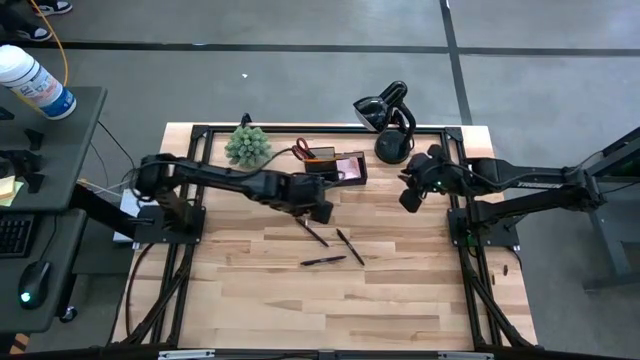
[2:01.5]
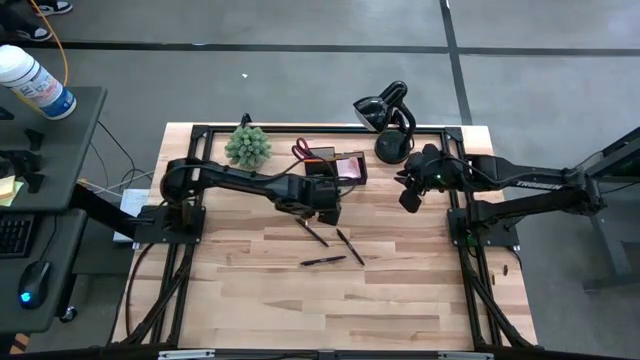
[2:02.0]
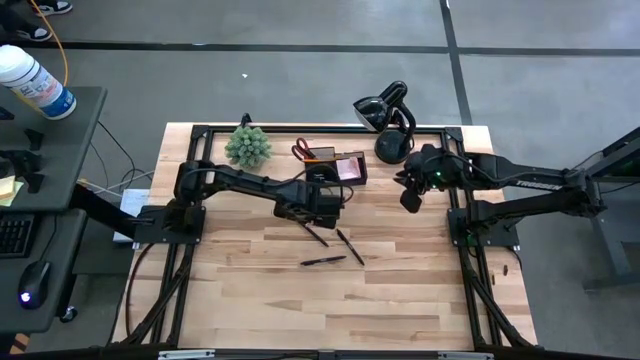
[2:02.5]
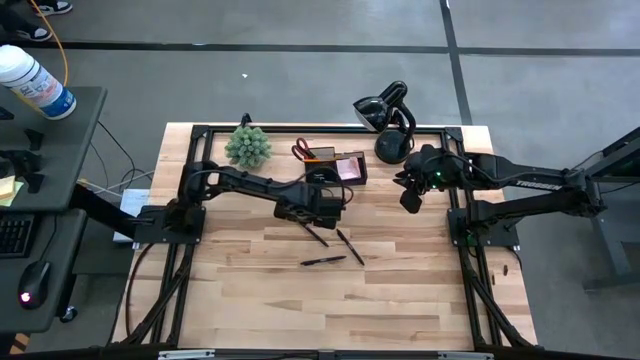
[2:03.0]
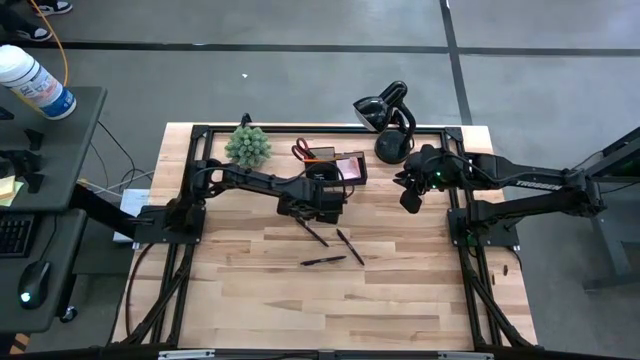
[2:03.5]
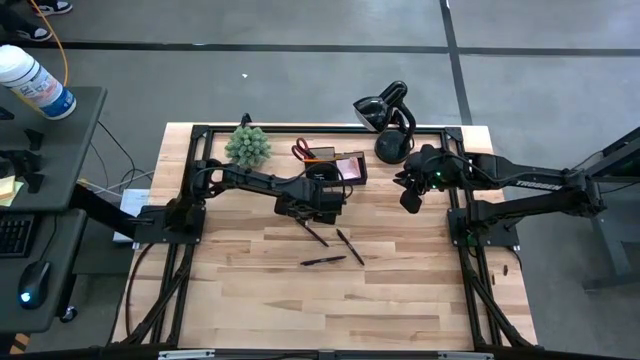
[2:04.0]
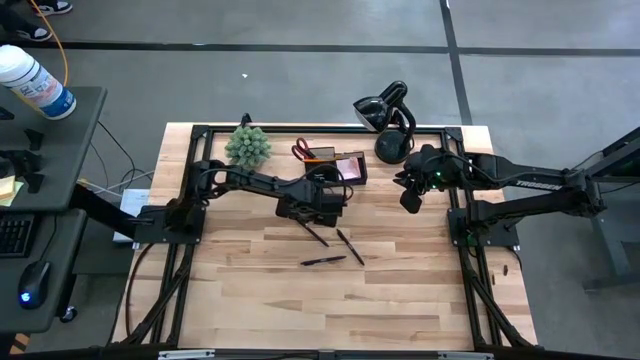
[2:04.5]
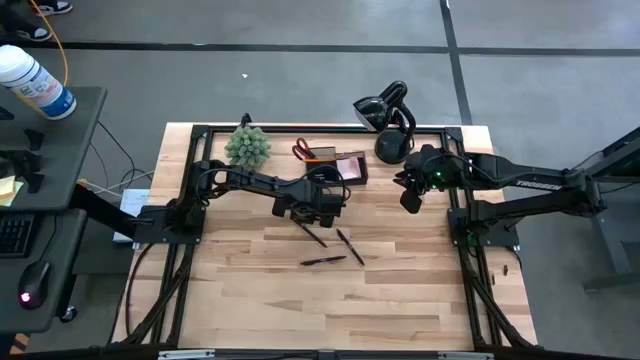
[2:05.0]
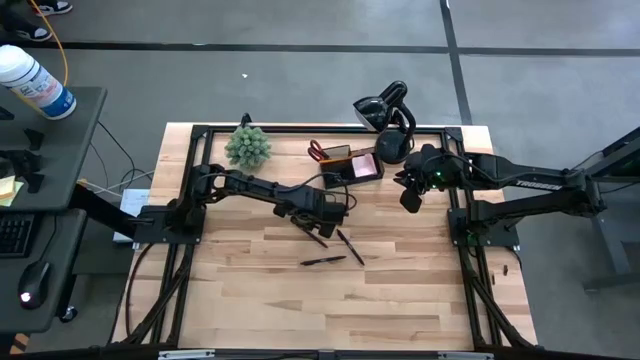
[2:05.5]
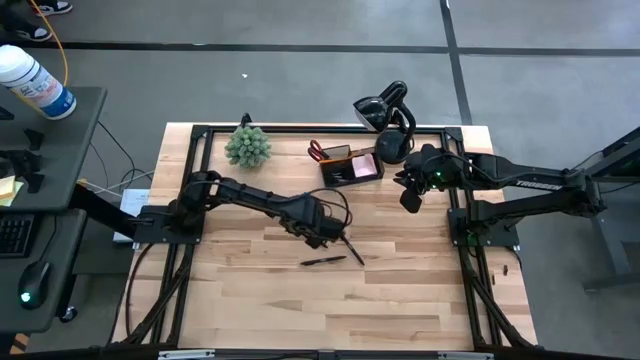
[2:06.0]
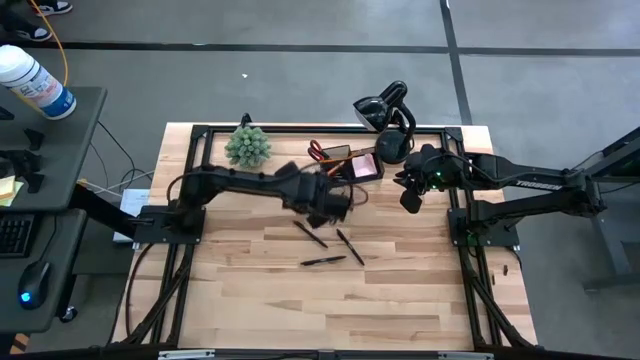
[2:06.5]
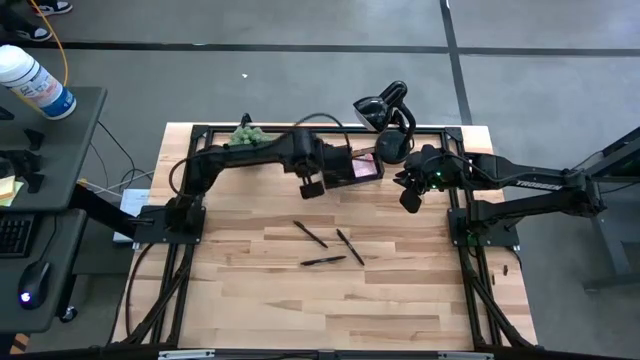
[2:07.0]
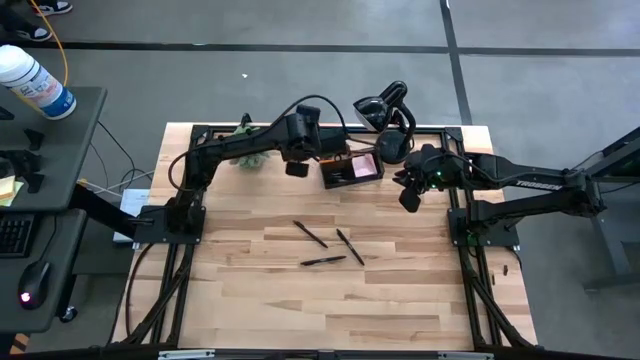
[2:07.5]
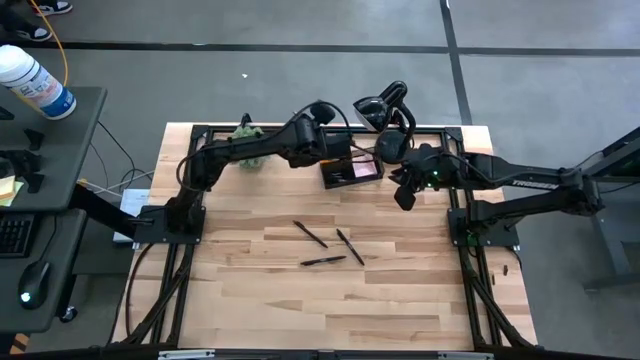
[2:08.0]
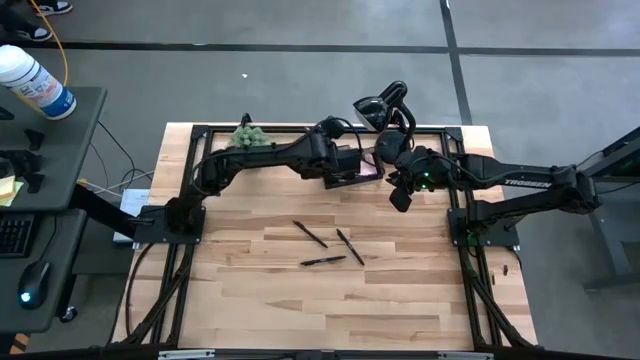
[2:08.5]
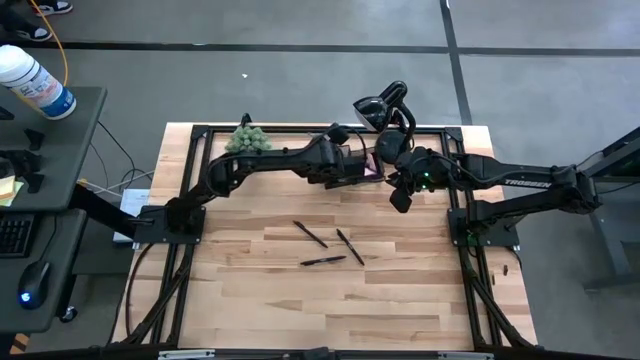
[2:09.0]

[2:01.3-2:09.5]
Task: Pick and place office supplies into organizer
Put the orange pencil into the black desk organizer

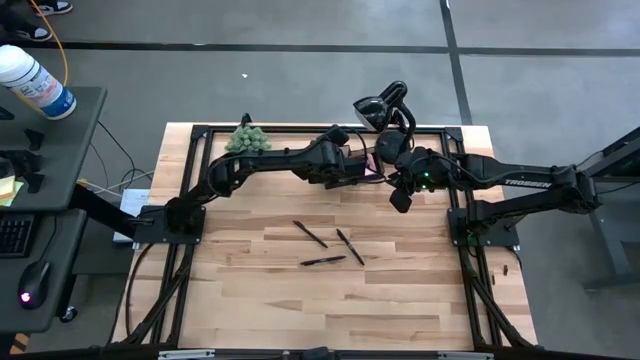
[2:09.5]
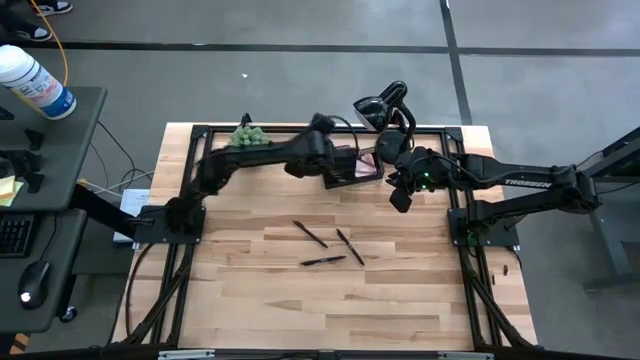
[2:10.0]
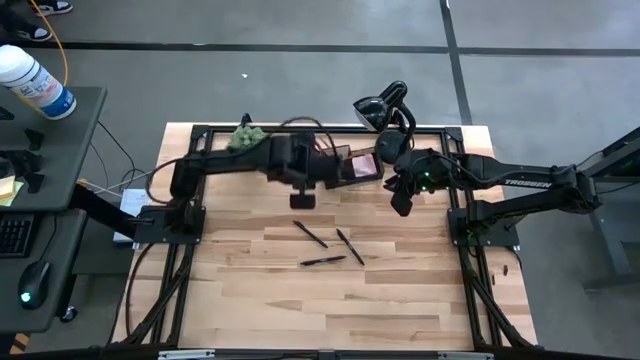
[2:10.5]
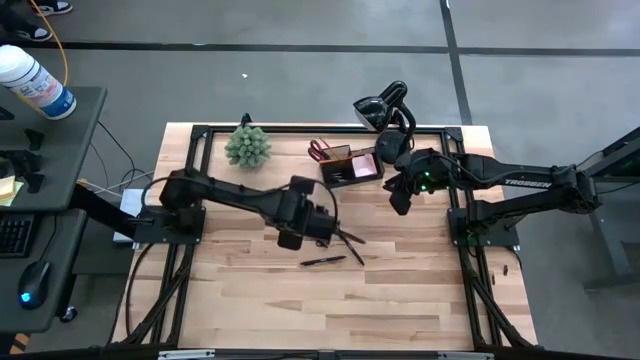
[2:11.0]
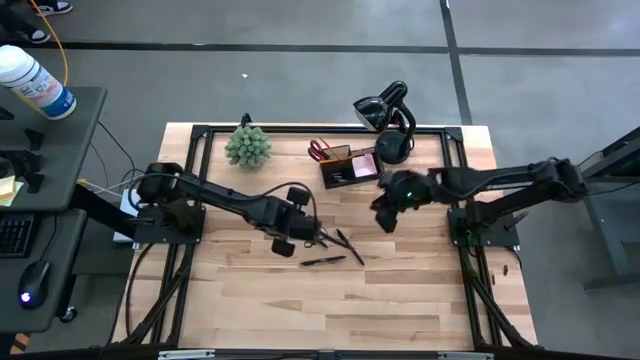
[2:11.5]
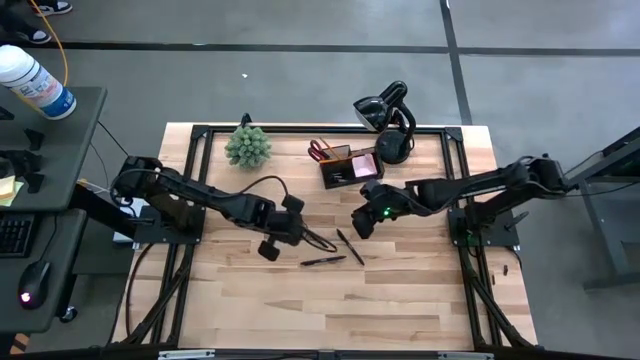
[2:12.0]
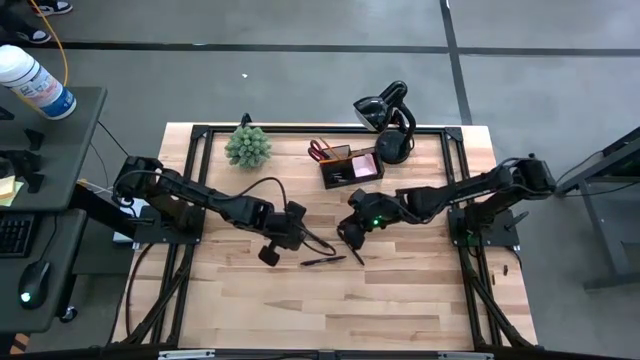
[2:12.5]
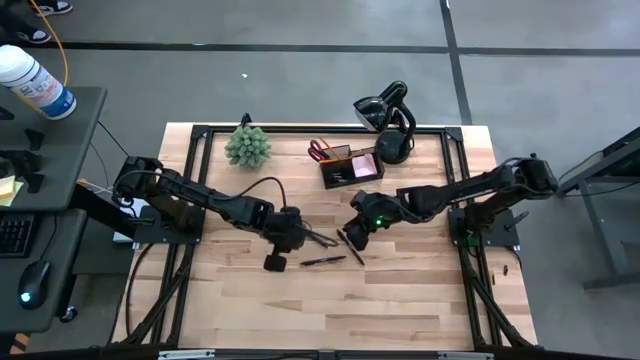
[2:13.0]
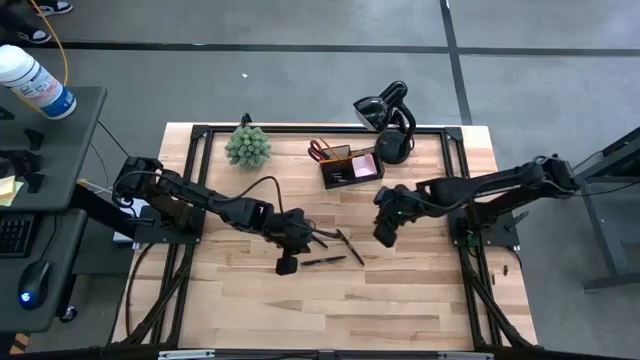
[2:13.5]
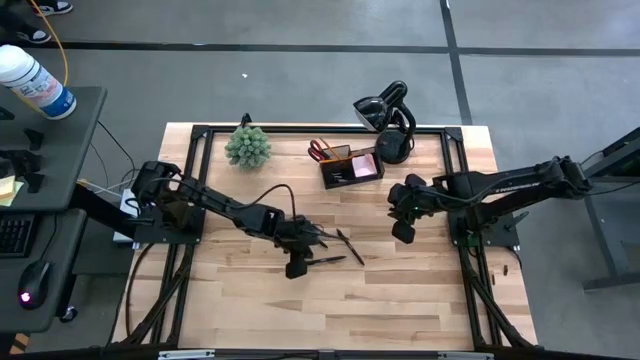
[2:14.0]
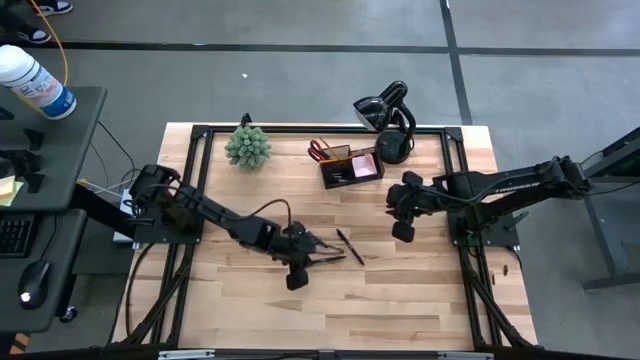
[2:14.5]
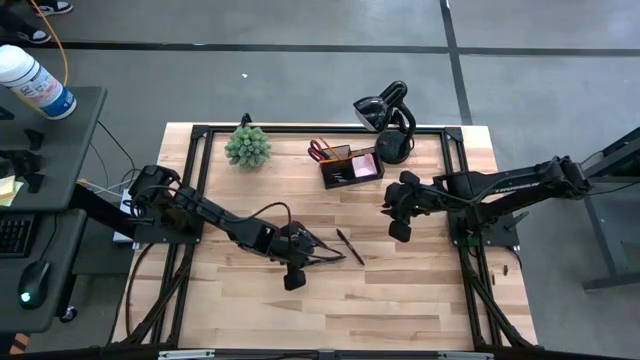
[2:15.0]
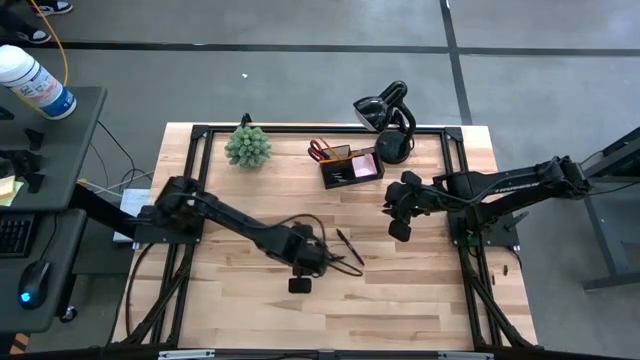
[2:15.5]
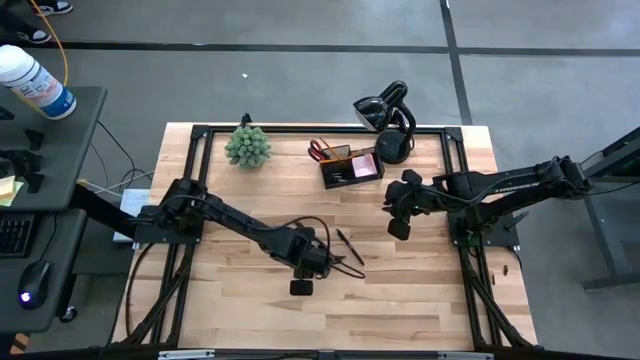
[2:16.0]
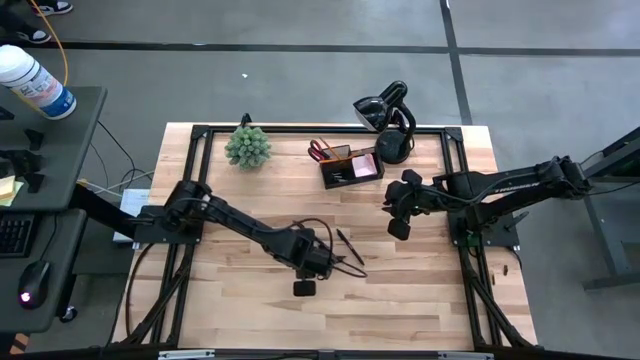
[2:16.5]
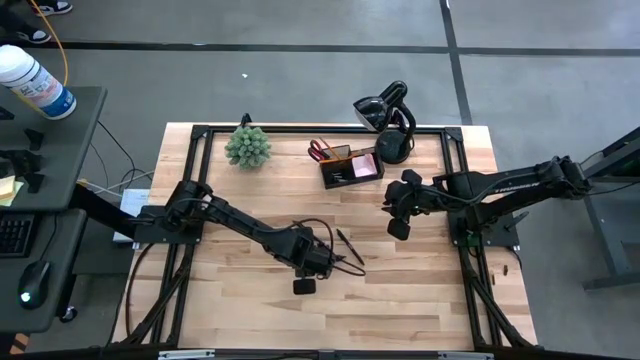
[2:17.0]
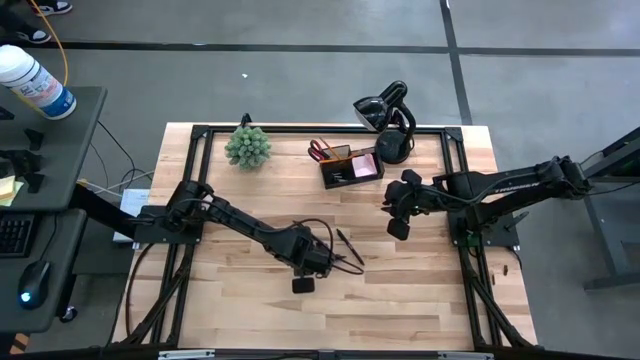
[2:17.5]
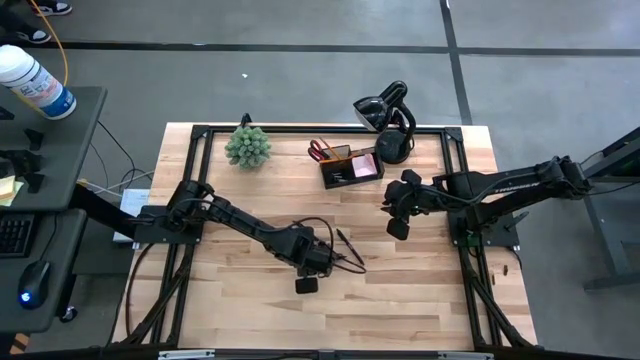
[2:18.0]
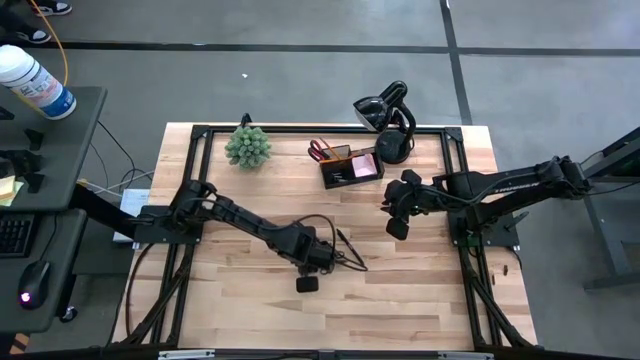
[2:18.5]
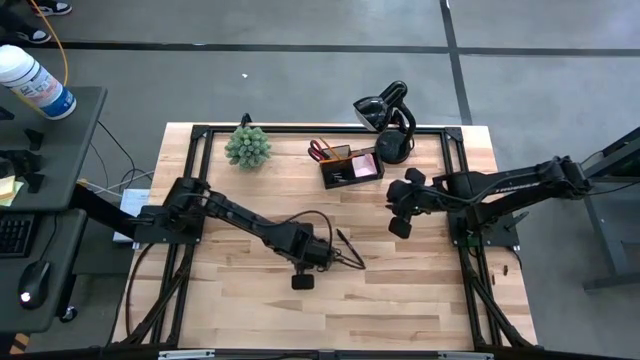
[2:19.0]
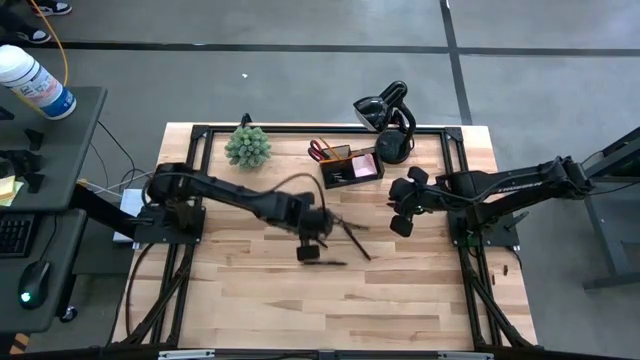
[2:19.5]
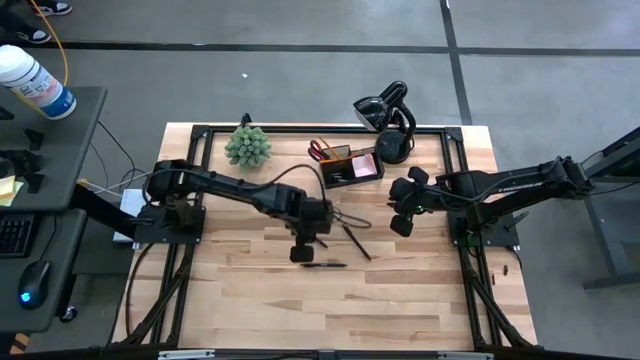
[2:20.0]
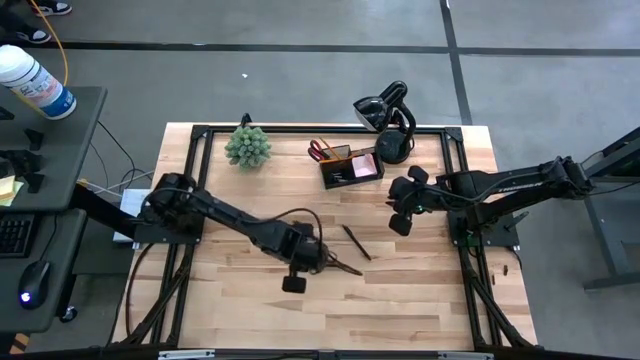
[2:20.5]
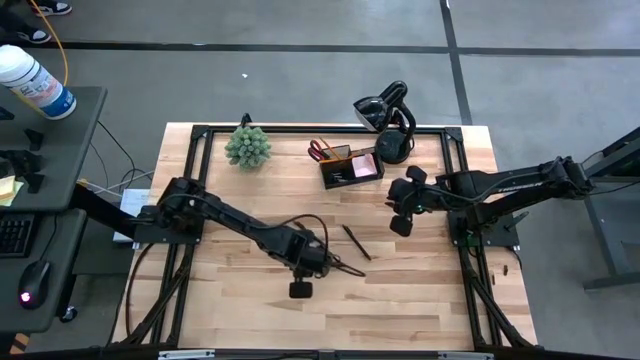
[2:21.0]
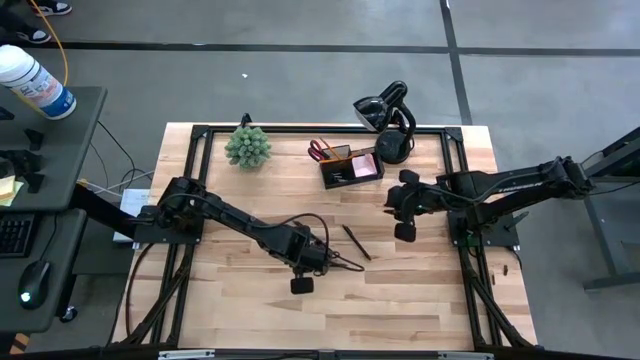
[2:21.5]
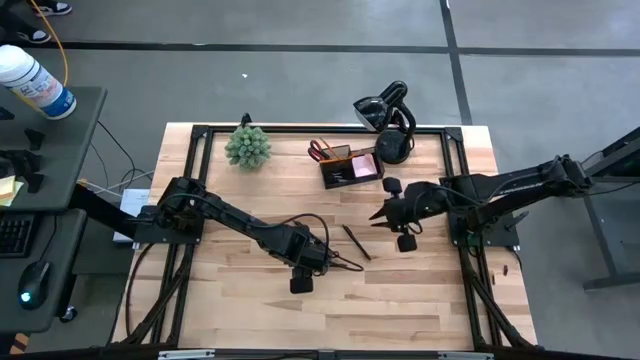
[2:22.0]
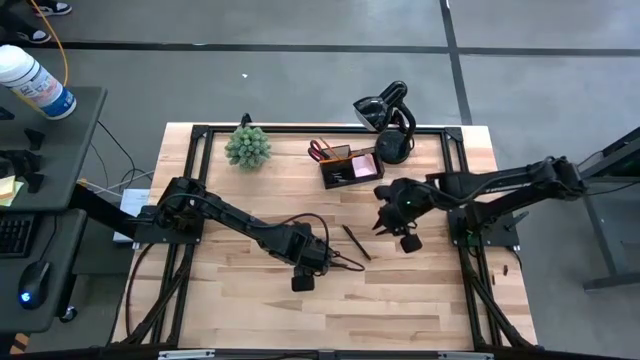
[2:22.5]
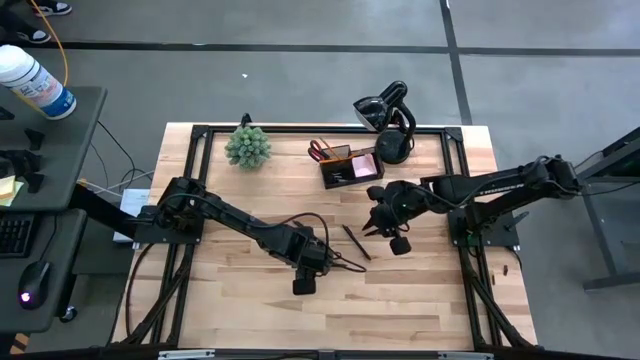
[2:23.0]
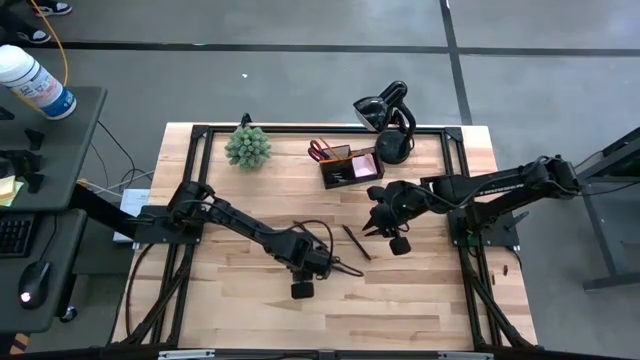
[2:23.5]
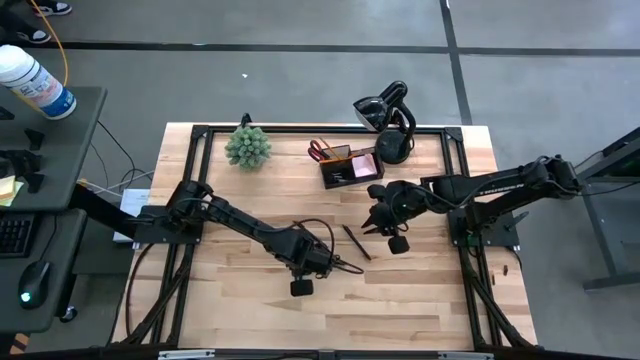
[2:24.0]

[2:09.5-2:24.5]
Put the bottom black pen into the black desk organizer
